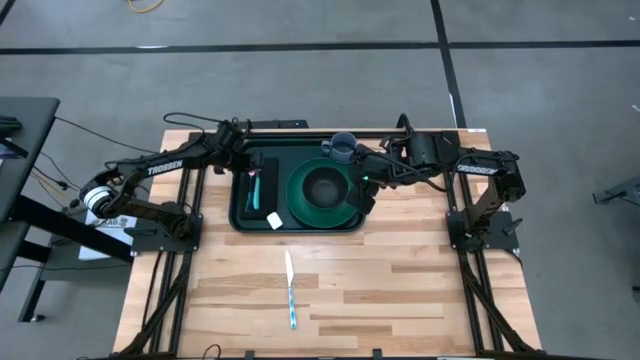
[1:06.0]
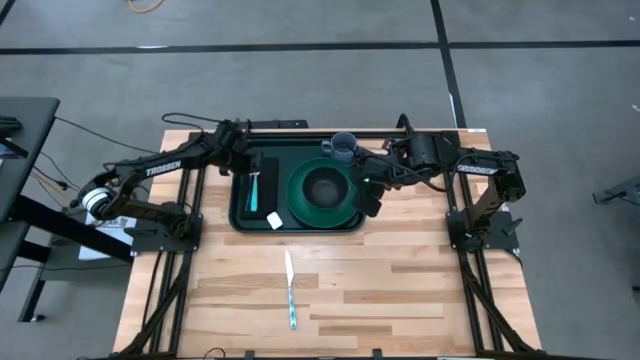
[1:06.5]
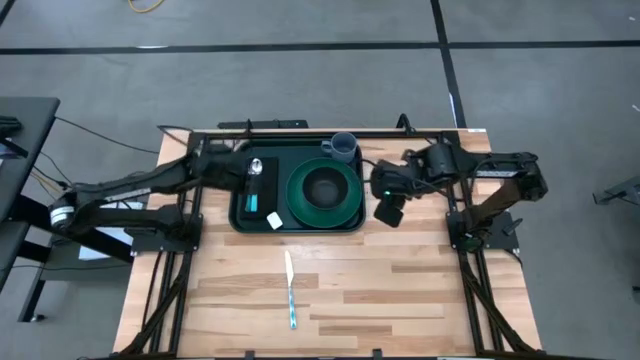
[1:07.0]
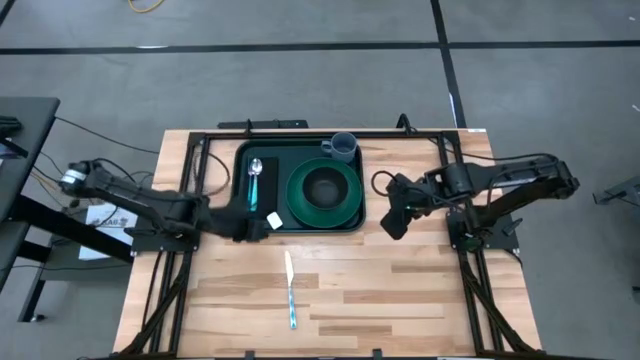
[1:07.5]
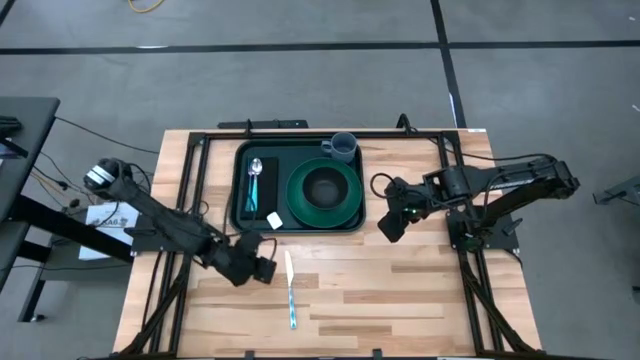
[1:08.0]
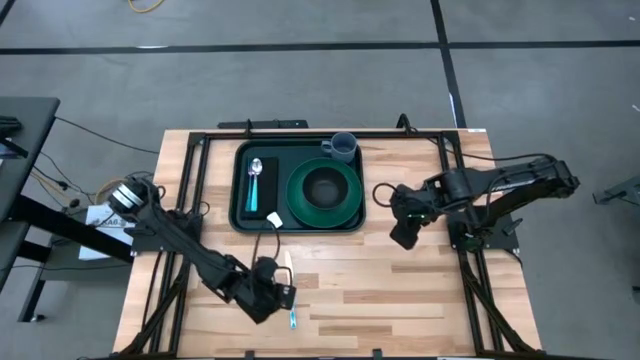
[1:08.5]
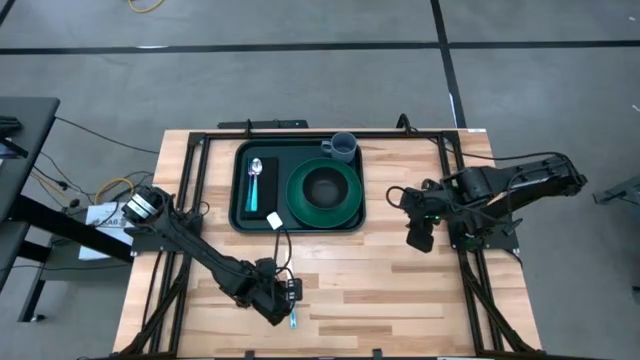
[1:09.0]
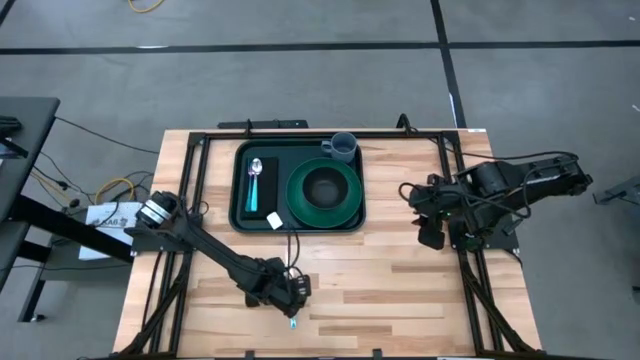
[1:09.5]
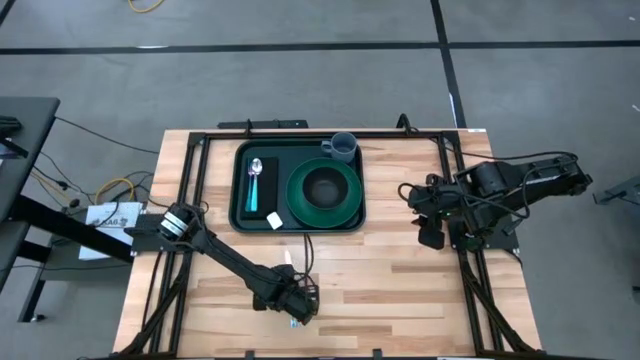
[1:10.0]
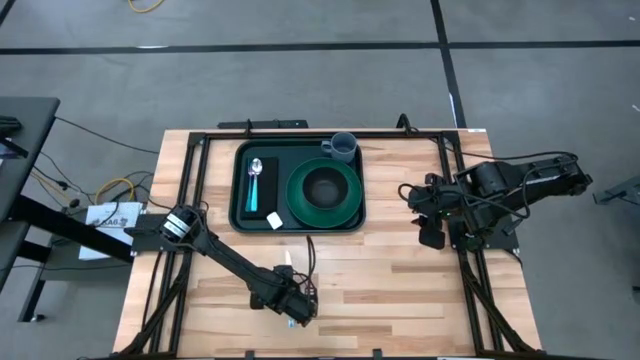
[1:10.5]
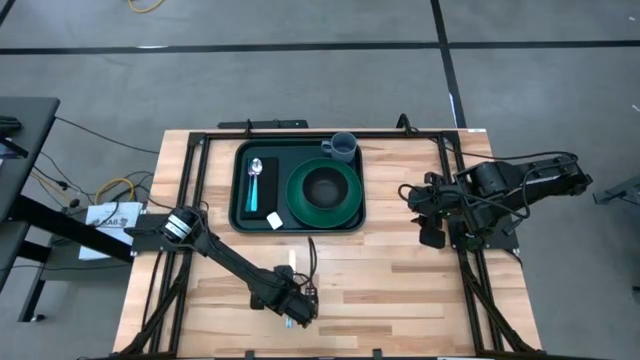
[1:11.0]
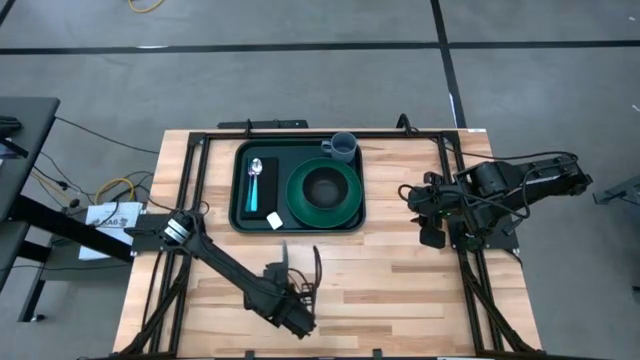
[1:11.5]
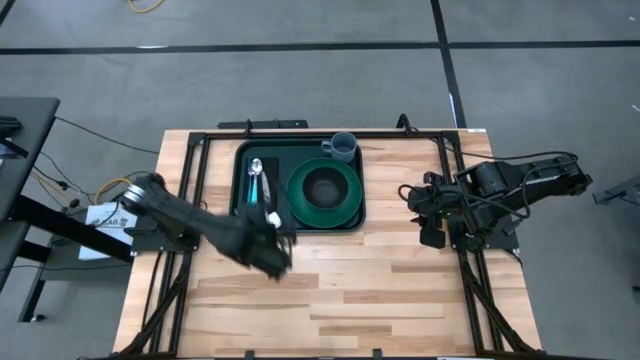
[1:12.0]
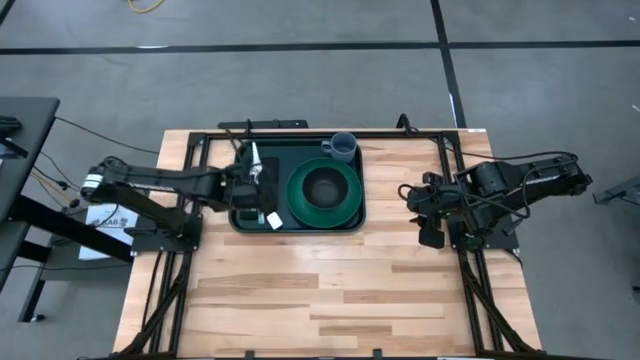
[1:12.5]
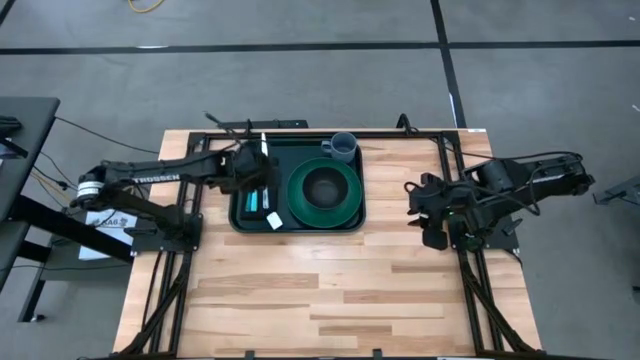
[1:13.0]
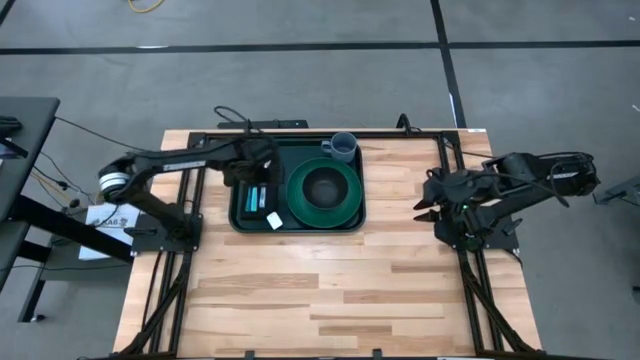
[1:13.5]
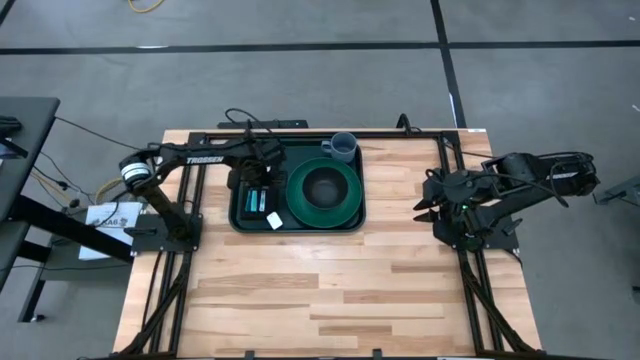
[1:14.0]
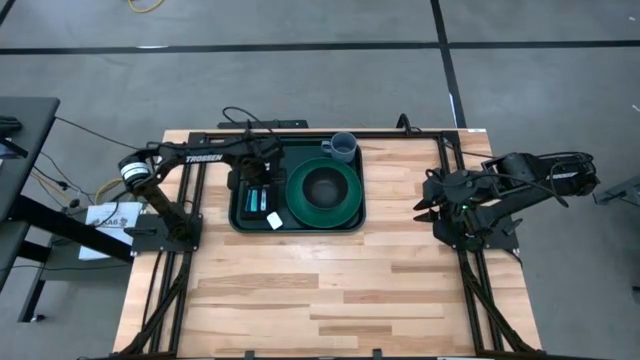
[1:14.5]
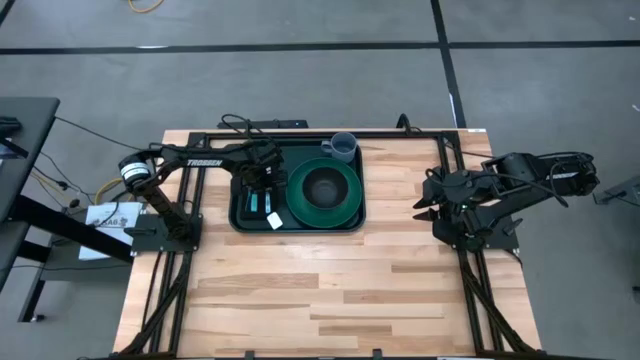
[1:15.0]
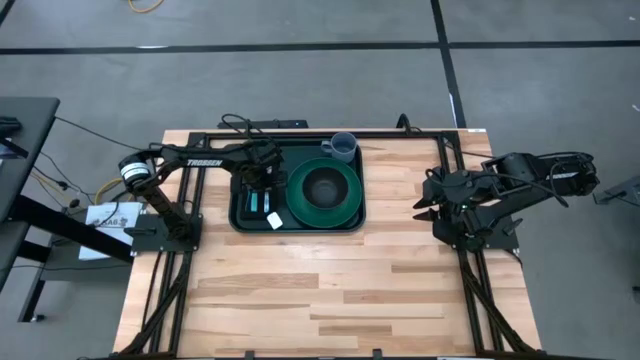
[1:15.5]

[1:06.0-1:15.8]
Task: Set up tray
Put the blue patterned knife on the black napkin to the right of the blue patterned spoon

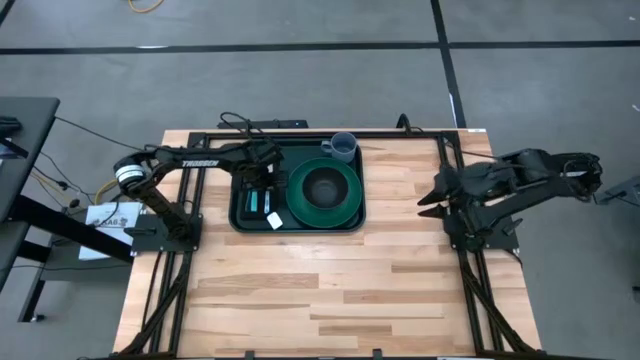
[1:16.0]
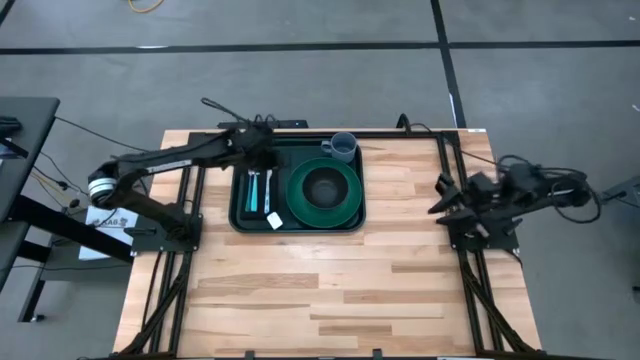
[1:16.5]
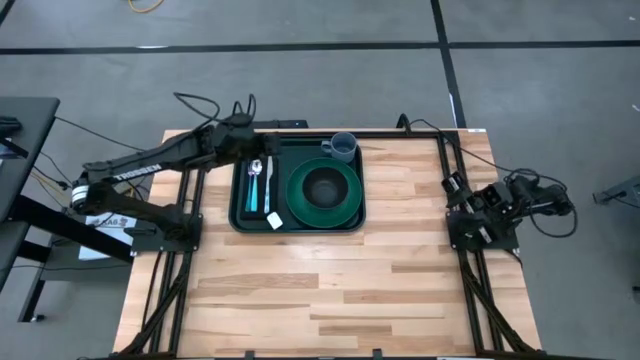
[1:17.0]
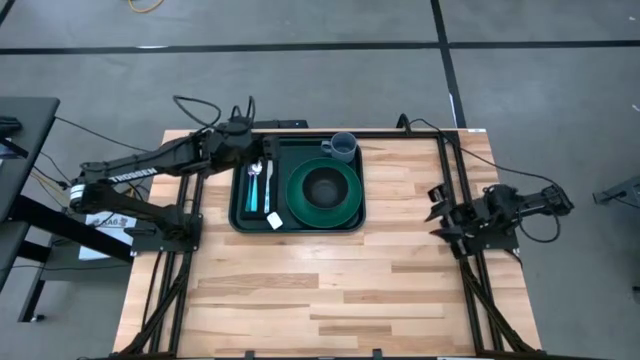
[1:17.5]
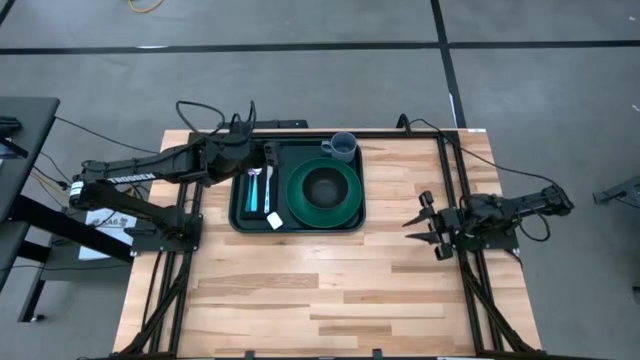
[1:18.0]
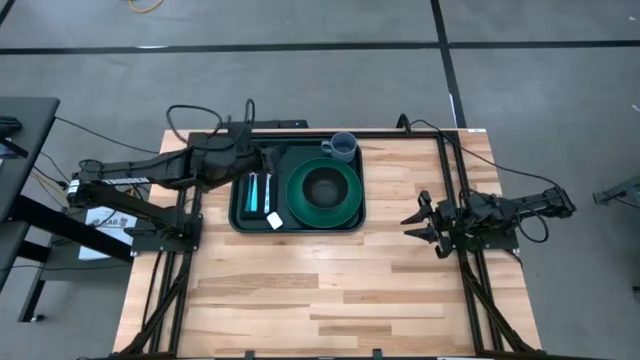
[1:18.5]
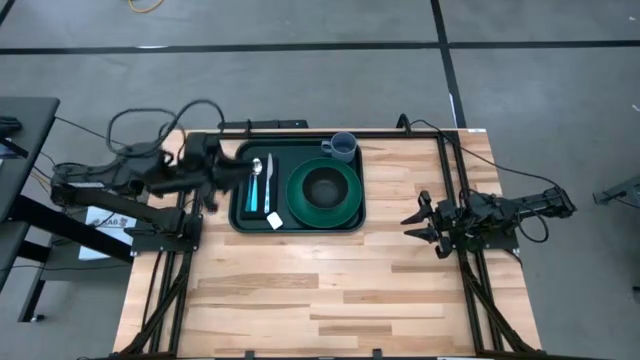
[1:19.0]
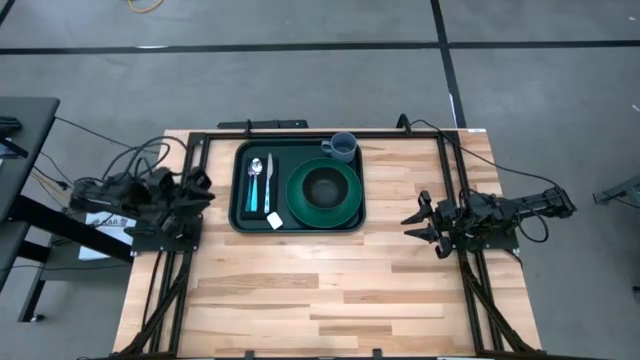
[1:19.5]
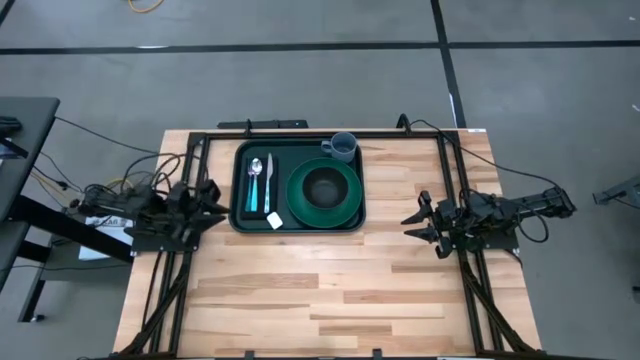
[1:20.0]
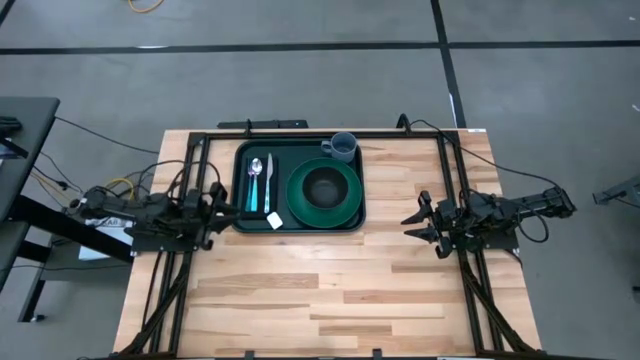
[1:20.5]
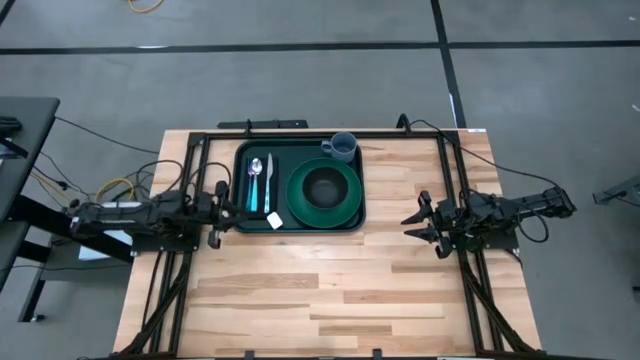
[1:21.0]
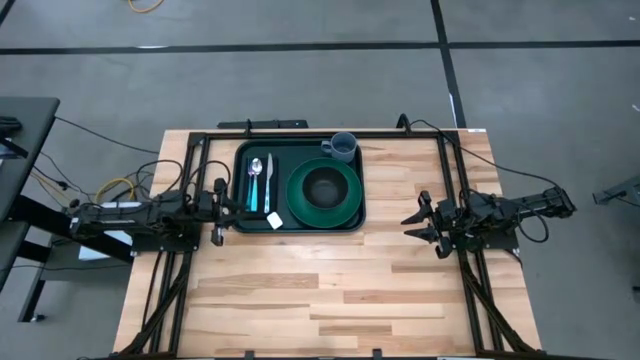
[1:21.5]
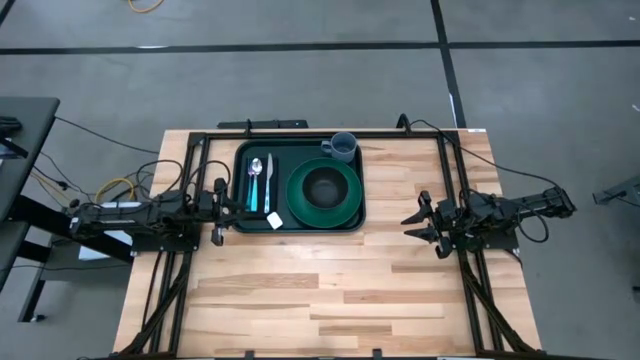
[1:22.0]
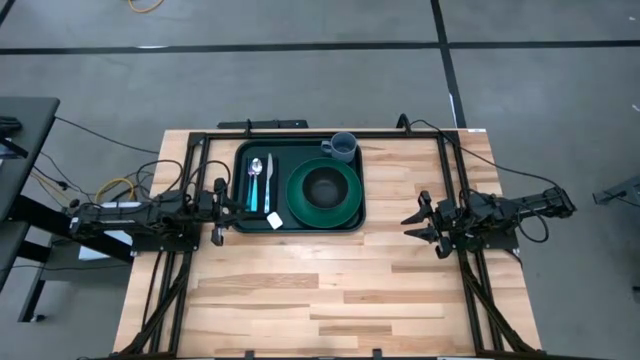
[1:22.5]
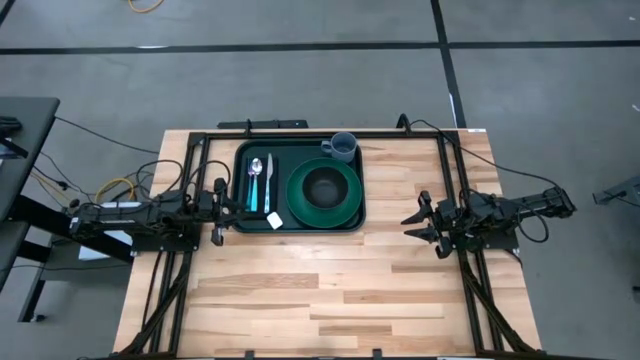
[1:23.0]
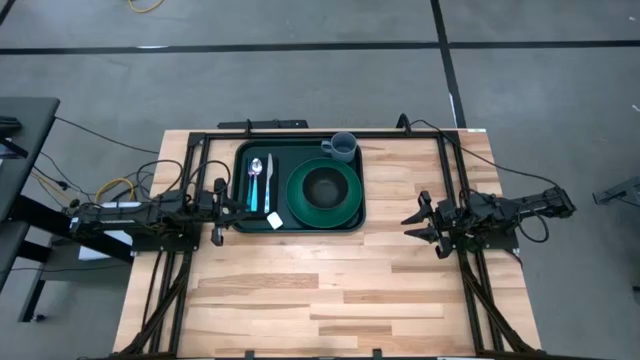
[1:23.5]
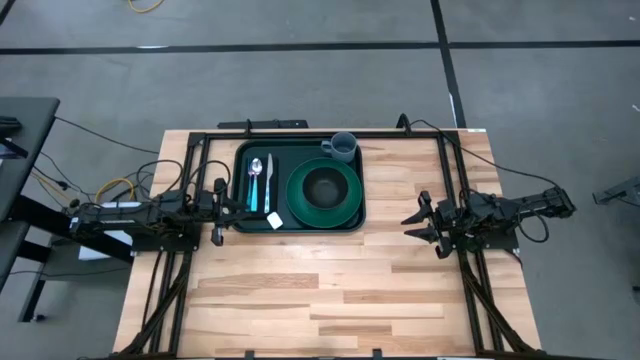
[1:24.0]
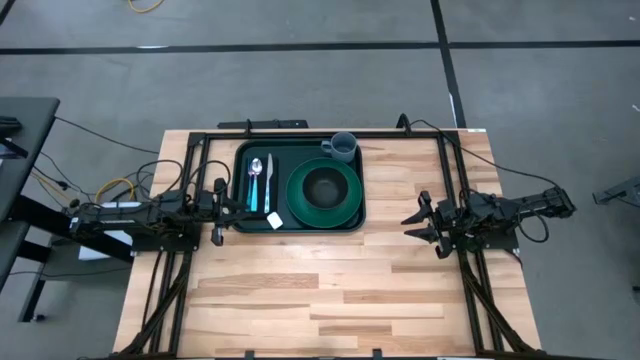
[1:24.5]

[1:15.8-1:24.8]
Return to Home Position

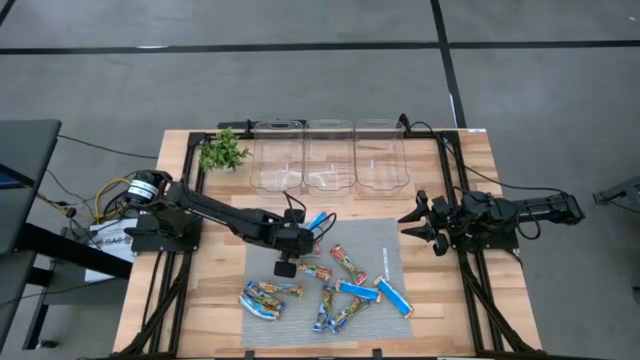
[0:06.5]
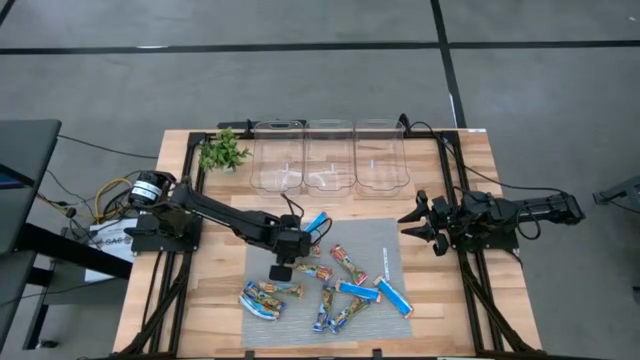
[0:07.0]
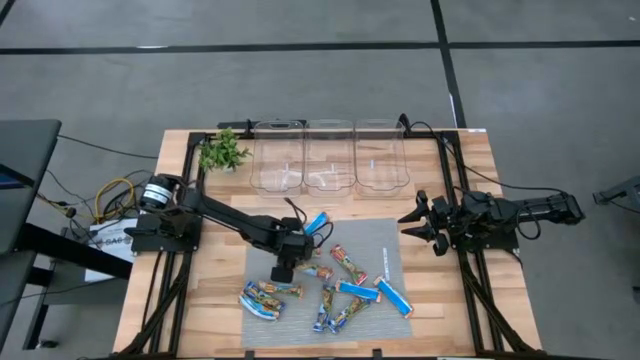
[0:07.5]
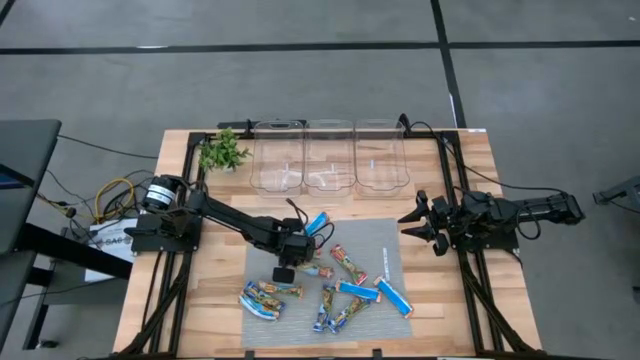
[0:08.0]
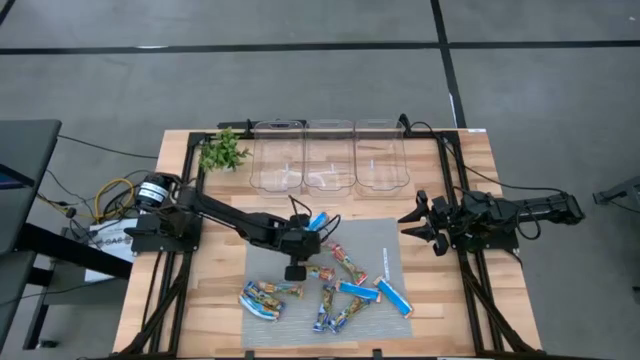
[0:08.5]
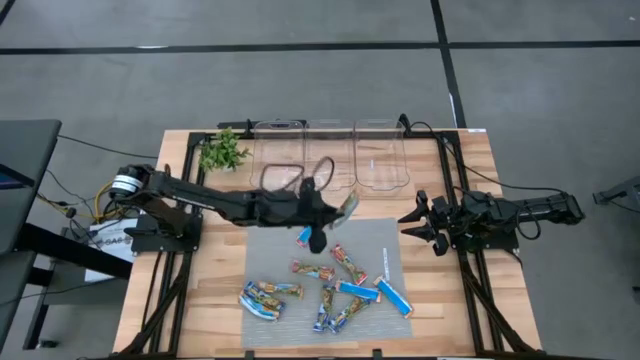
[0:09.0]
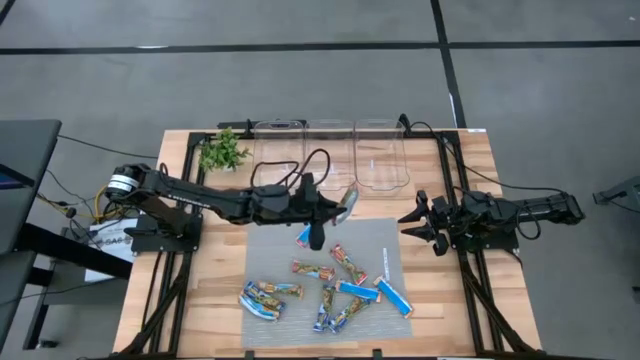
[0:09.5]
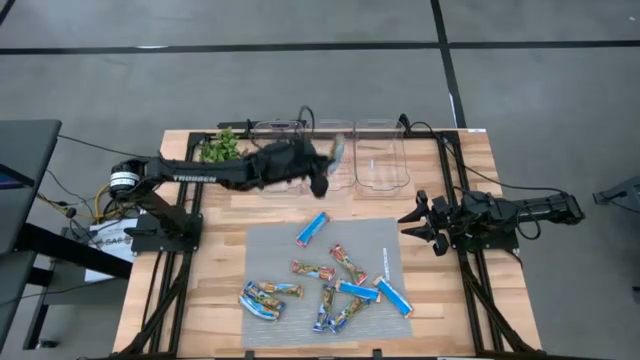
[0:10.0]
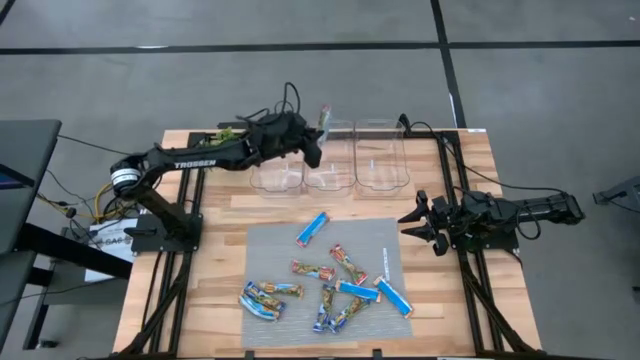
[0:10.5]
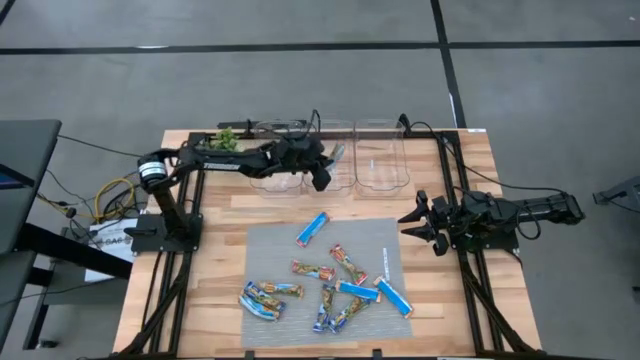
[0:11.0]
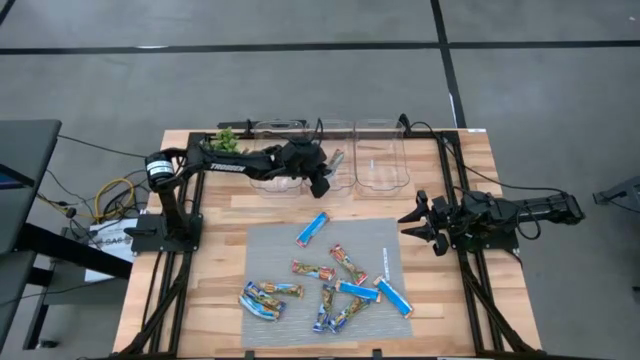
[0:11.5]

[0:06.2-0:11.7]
Task: Pick and place Granola Bars by type
Put the red granola bar into the middle transparent bin
